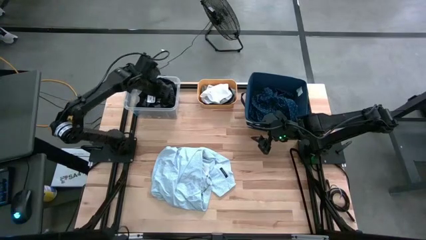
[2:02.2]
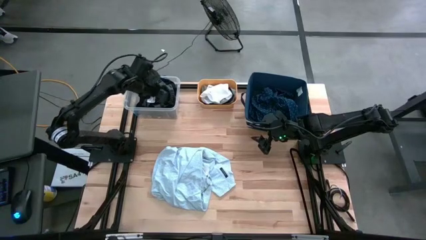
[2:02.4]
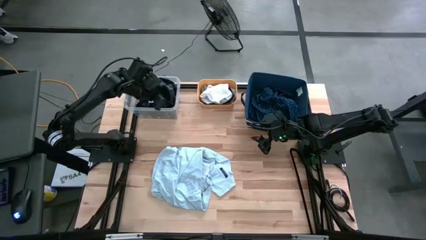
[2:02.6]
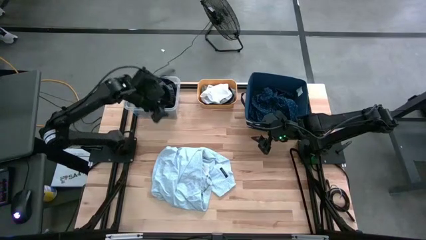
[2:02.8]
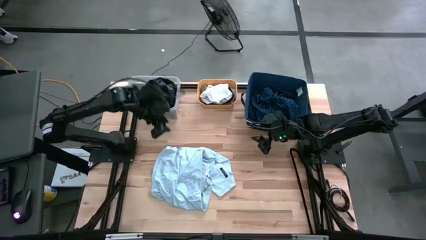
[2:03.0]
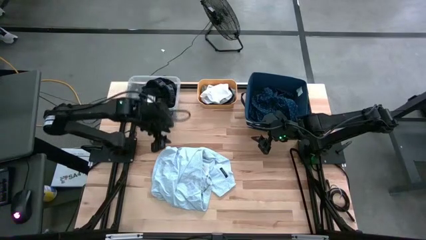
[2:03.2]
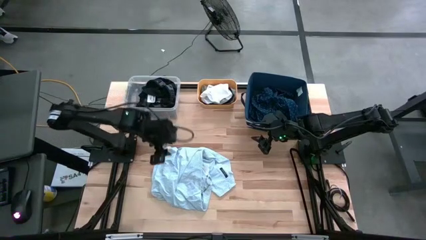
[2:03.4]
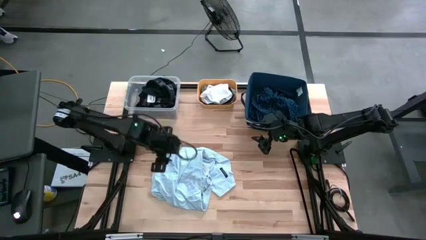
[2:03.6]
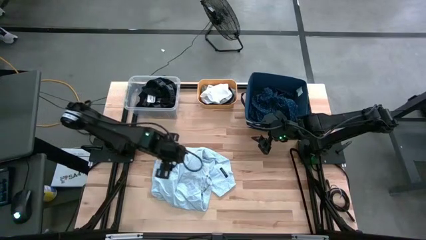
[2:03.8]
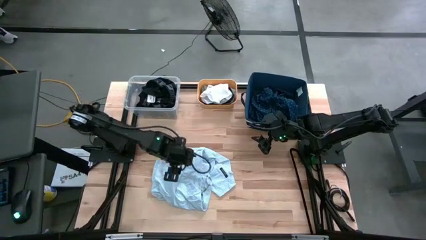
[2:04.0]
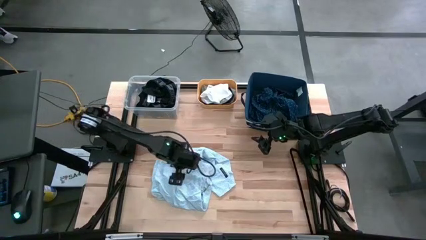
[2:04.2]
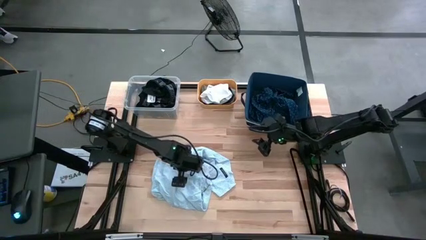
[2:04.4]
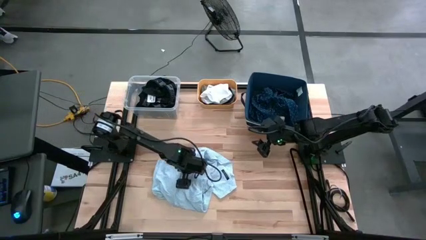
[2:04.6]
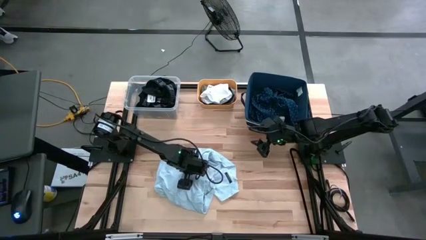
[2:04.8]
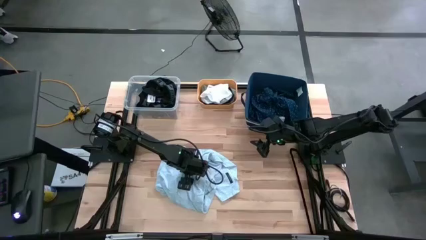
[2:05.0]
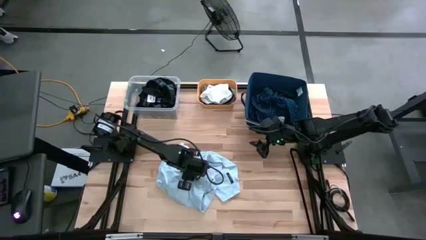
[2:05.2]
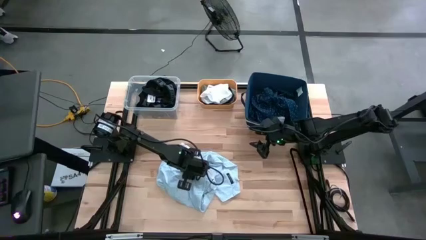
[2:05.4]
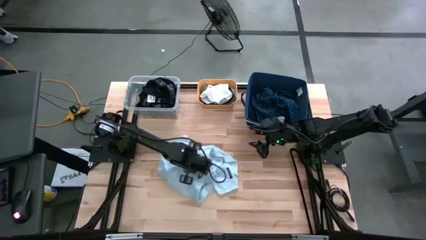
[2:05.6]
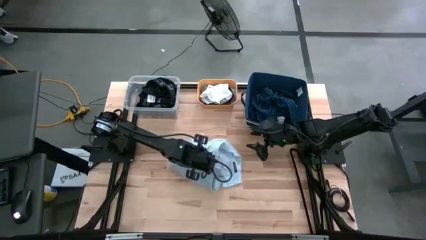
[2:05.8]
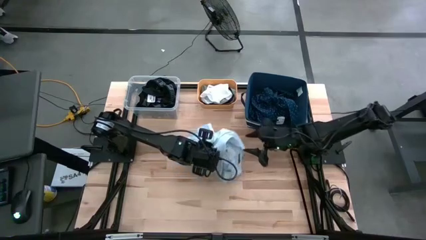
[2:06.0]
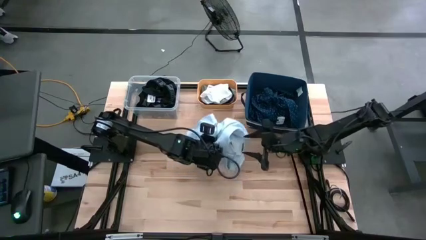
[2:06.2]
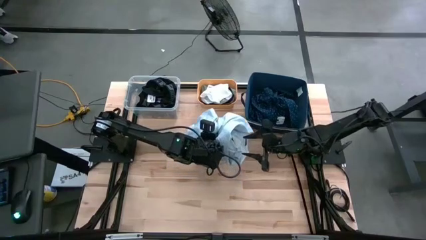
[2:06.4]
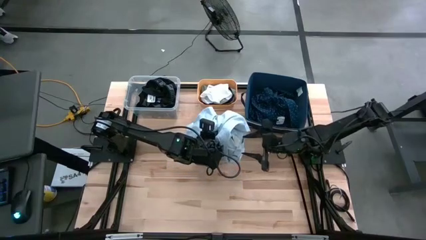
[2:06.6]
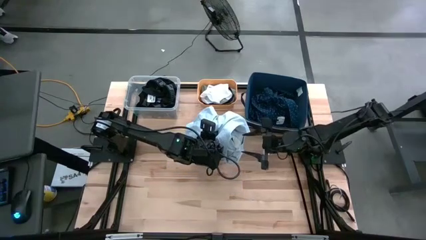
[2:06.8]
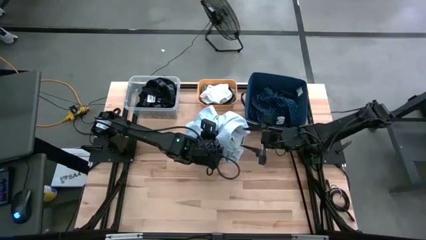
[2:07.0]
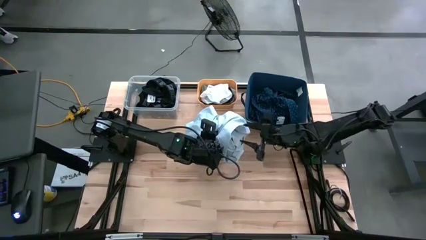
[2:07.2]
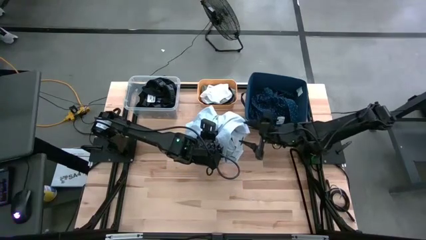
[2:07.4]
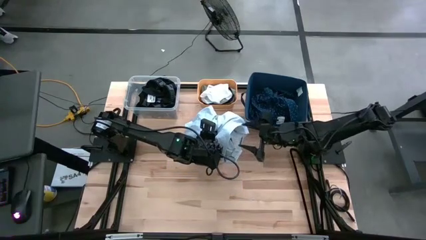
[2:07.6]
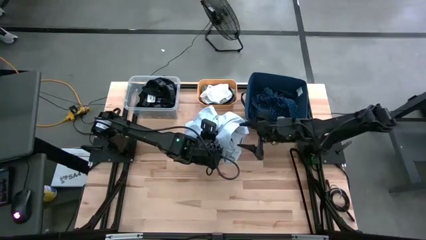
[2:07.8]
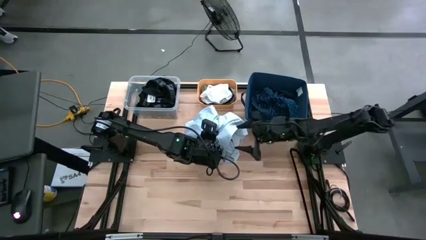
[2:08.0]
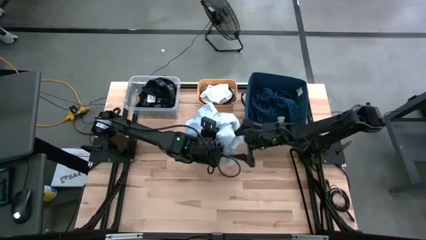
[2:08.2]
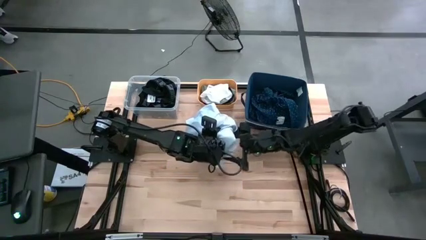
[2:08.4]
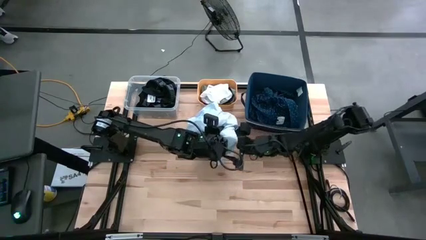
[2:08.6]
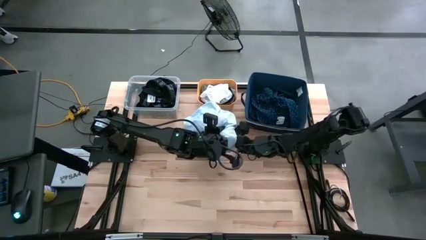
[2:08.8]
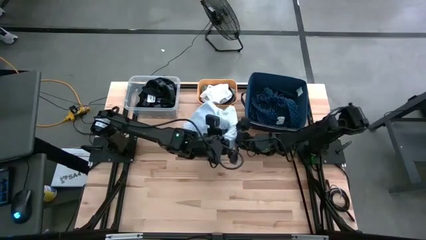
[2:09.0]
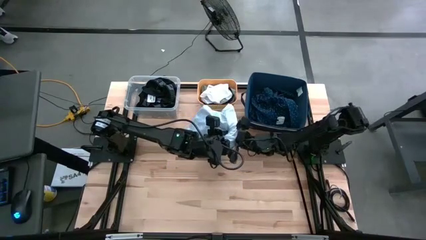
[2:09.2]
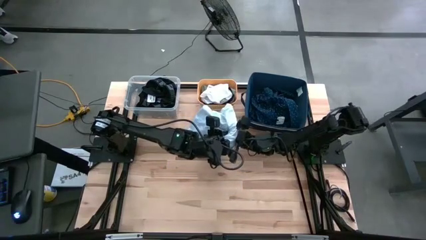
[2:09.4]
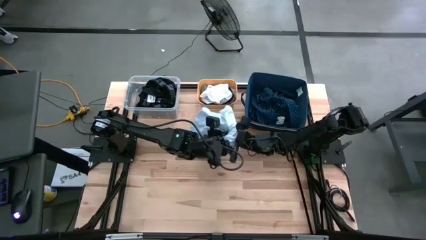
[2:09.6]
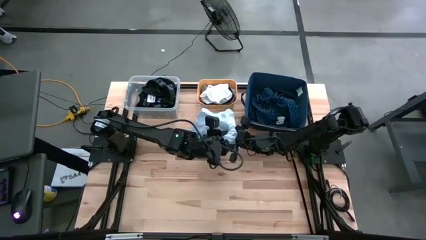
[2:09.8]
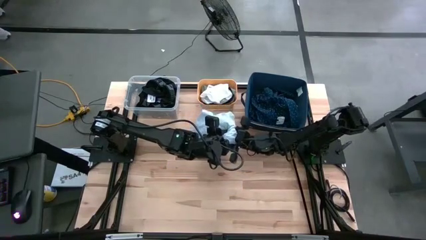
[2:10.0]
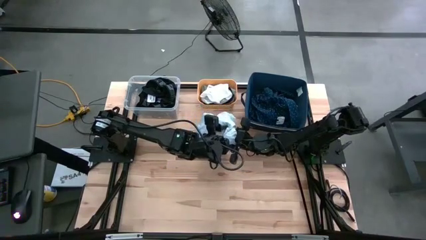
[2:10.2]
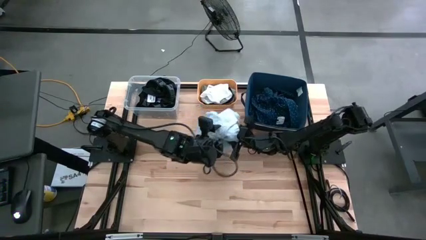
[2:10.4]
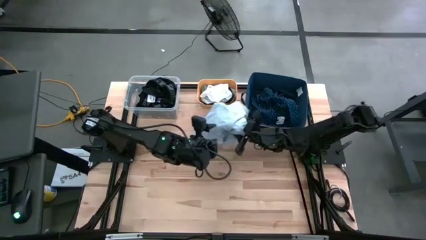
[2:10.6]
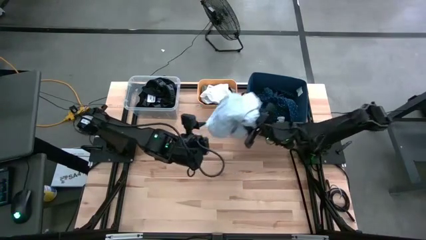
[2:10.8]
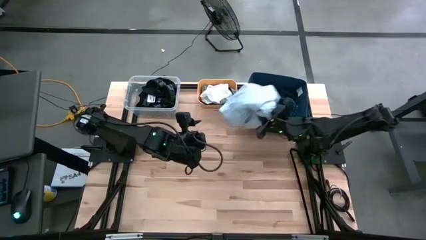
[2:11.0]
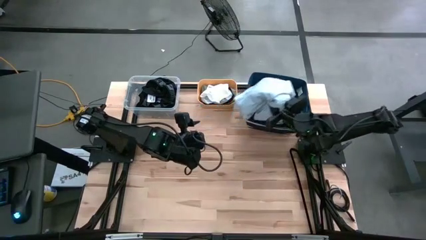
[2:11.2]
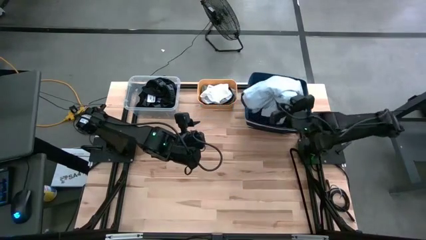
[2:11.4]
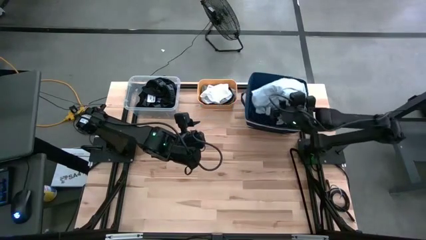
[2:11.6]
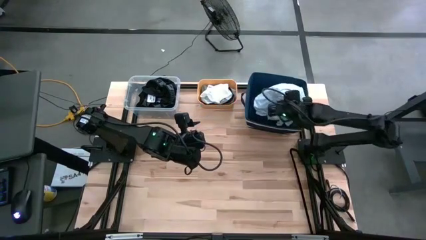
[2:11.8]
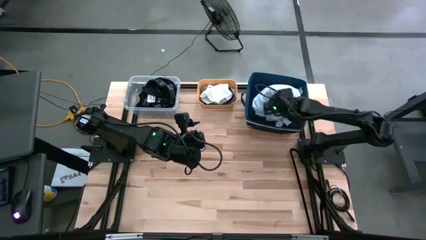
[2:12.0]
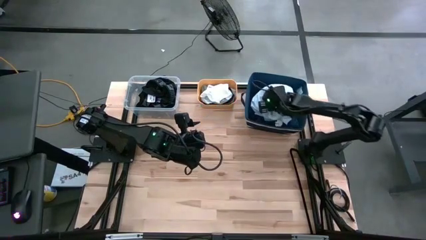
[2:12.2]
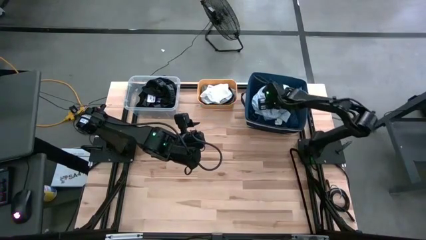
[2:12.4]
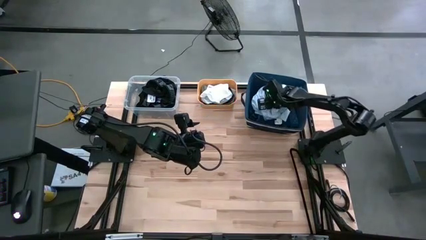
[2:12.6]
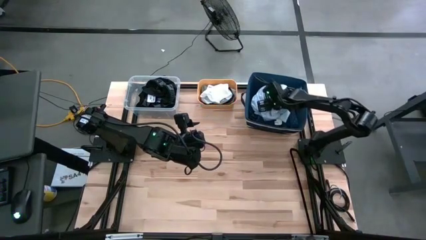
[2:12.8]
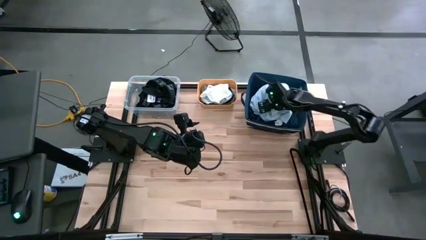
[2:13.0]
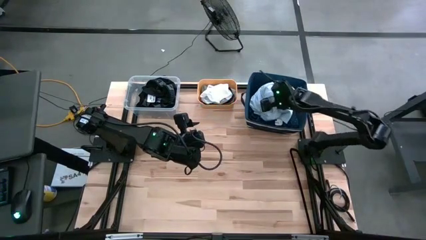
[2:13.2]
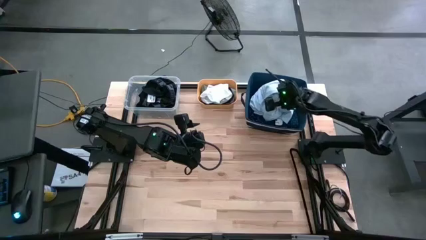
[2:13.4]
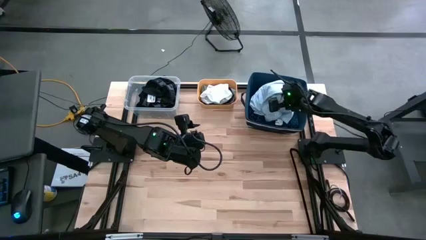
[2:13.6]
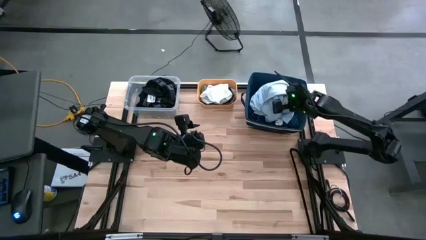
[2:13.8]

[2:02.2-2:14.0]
Task: Pick & Place Cloths
Put the white patterned shirt into the blue bin

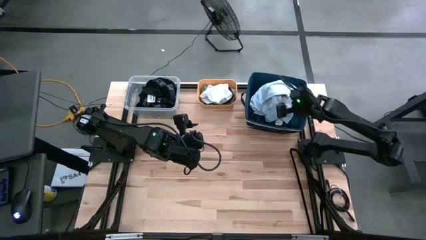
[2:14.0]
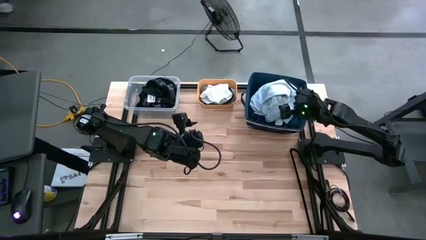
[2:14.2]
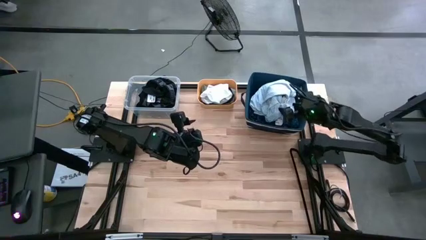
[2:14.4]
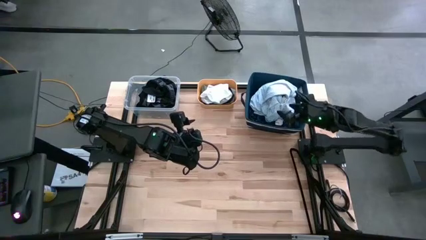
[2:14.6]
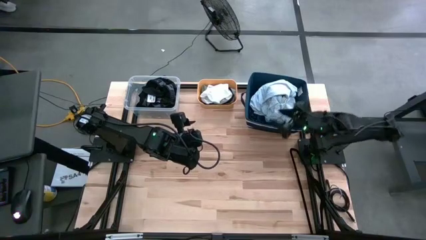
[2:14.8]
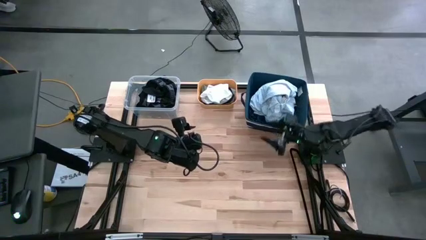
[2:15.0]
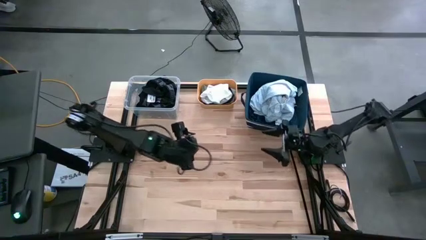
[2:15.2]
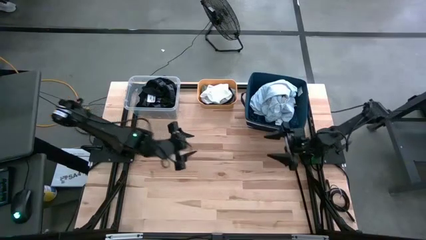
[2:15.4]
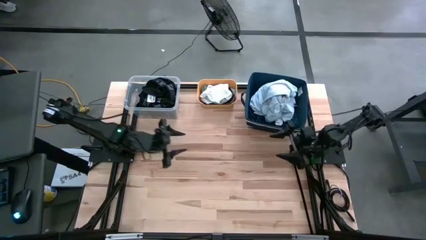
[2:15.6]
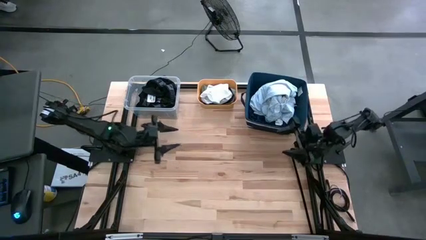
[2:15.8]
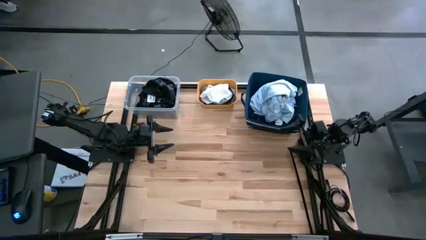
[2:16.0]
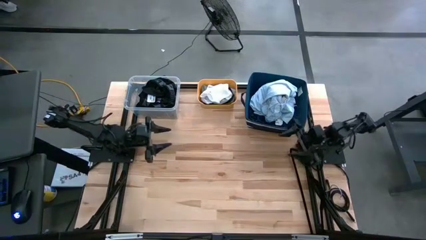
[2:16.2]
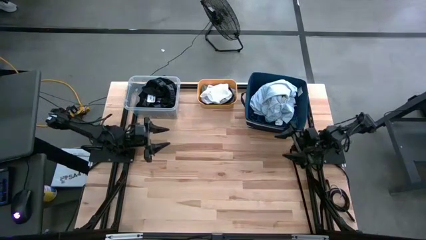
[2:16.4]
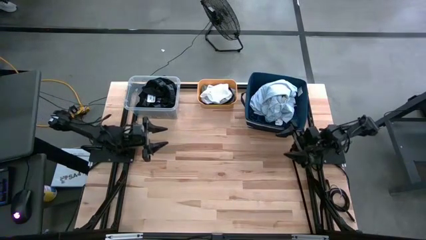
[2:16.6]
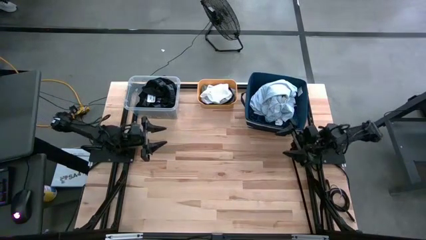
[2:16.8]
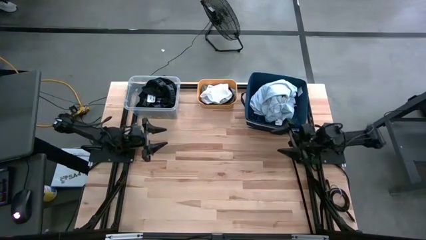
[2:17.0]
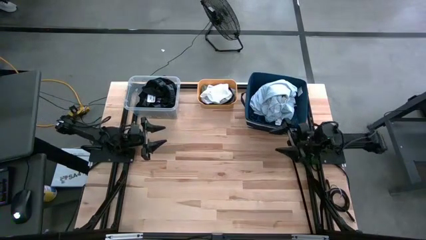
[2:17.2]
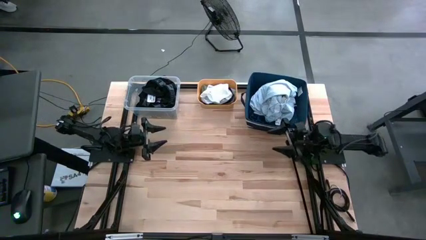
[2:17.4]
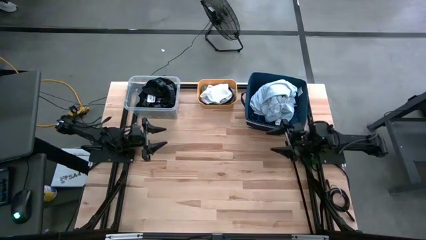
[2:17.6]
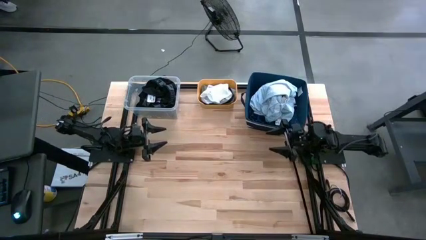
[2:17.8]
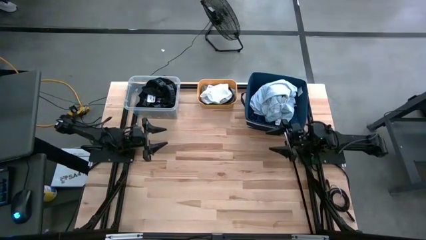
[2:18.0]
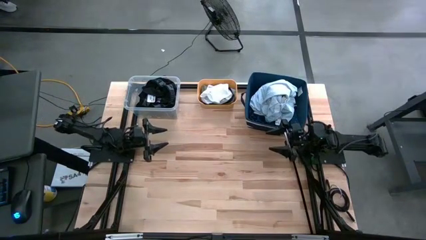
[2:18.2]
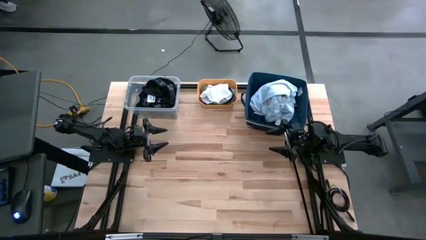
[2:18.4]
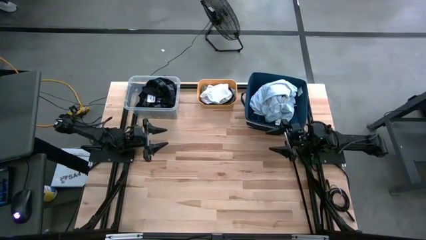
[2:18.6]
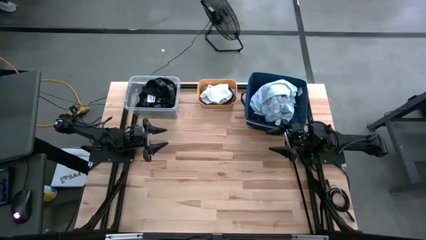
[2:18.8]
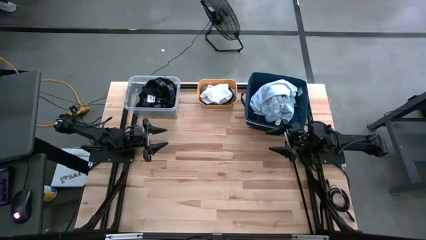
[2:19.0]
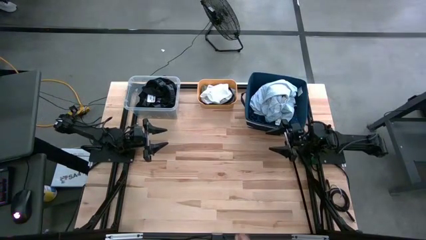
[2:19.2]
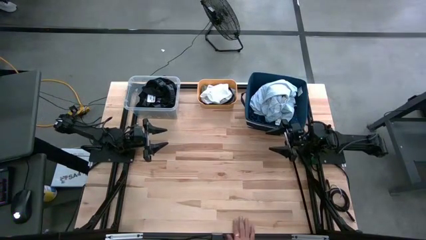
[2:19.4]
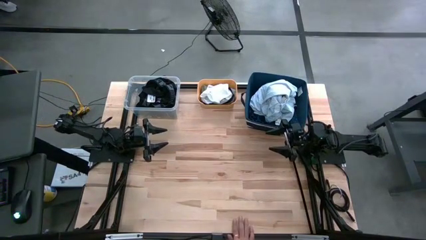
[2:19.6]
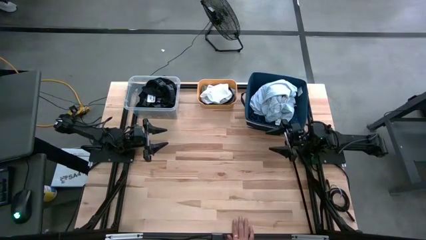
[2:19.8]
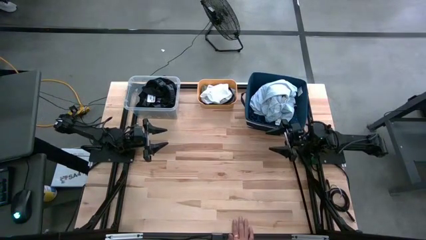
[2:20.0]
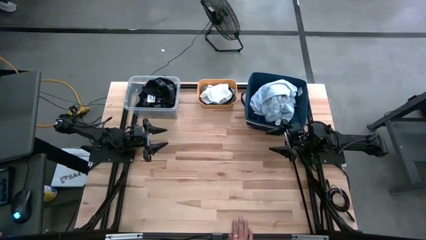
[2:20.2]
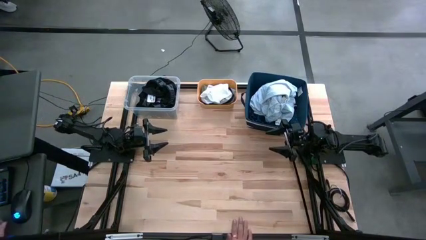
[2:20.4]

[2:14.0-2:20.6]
Return to Home Position
